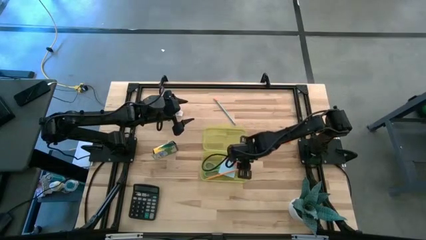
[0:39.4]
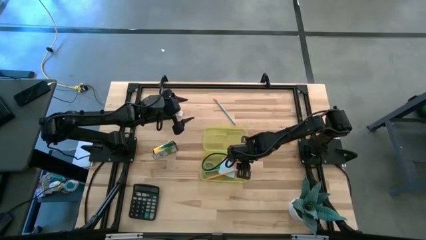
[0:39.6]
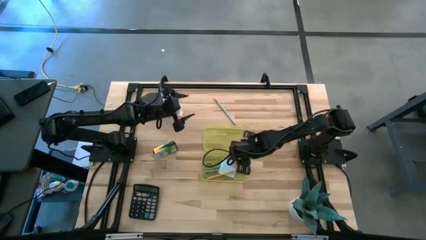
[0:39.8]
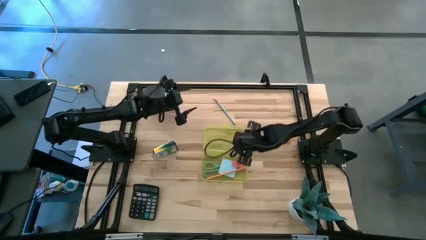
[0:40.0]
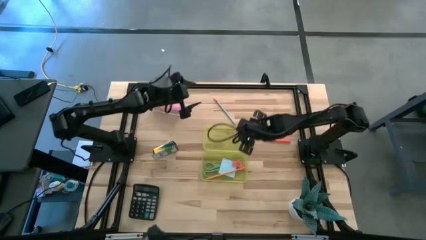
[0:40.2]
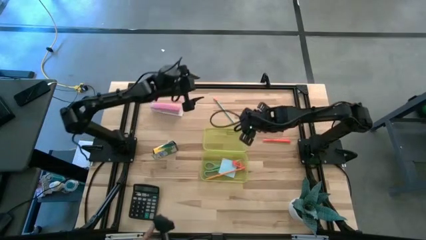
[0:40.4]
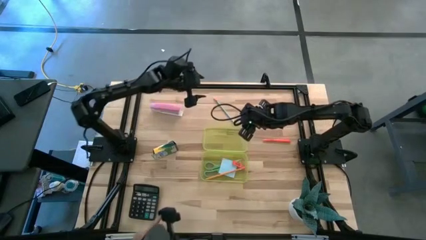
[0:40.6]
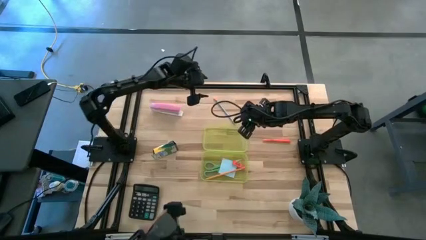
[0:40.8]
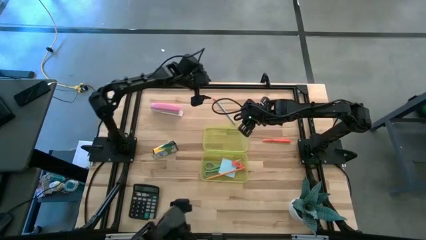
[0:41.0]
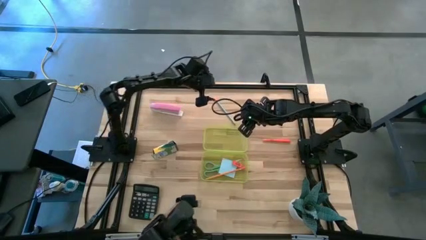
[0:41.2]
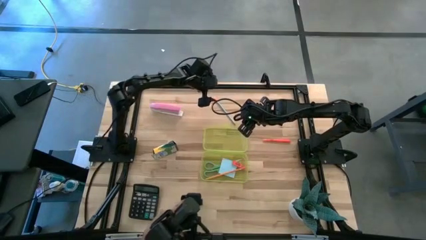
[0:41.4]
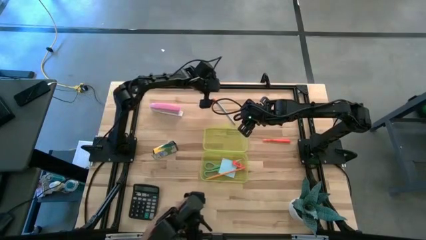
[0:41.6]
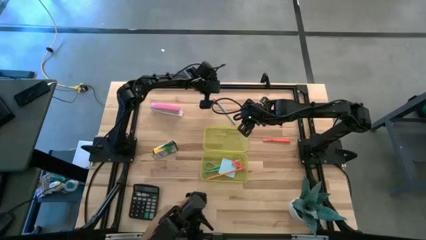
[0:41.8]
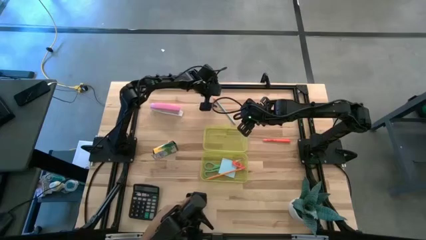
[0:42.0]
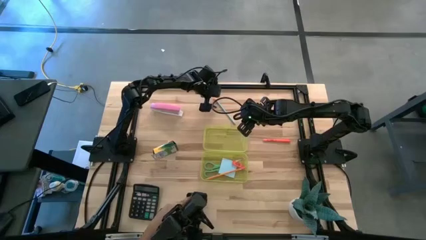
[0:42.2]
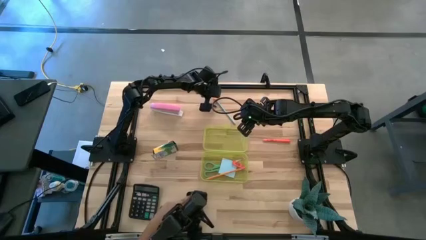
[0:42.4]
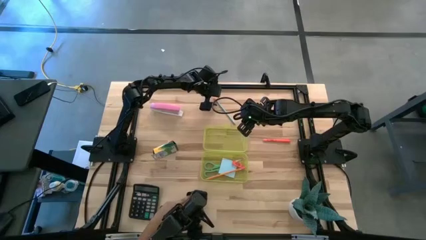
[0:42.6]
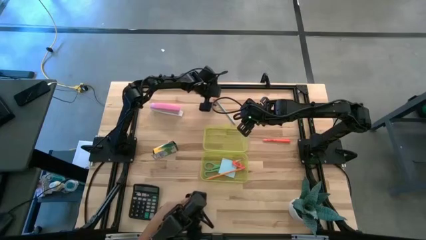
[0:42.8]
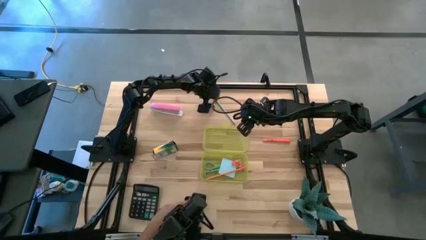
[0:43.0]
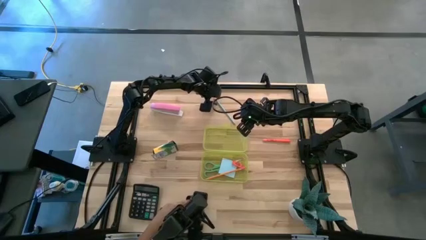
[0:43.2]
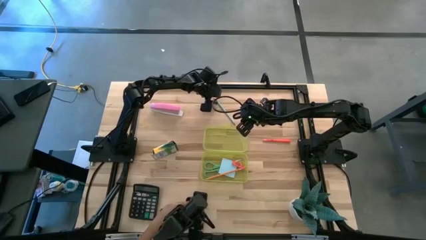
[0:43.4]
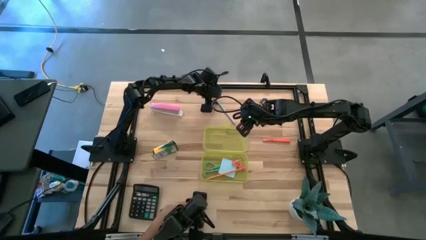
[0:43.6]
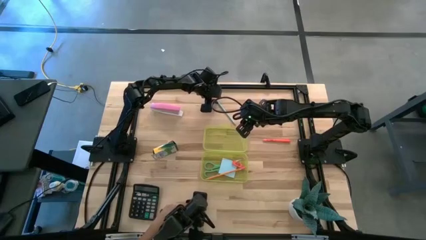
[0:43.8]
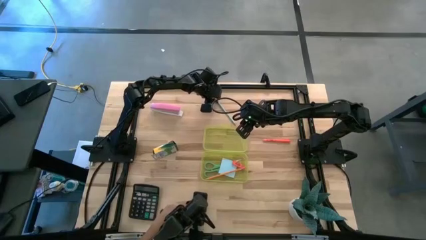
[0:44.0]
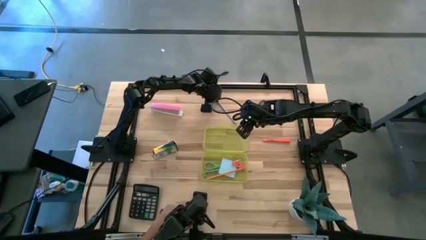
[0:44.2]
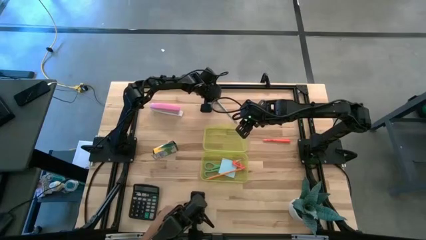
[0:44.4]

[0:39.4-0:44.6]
Task: Pack school essentials
Put the light blue pencil into the supply box

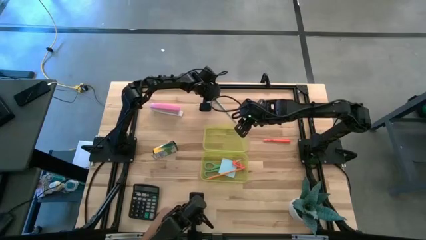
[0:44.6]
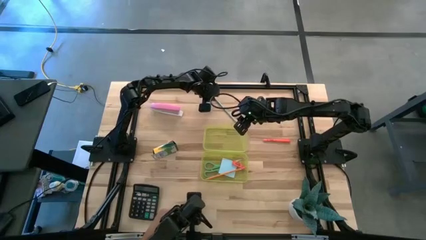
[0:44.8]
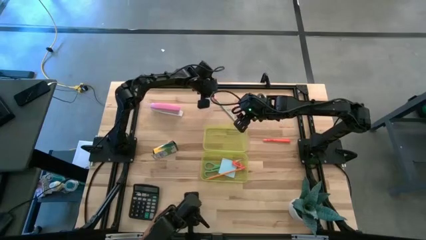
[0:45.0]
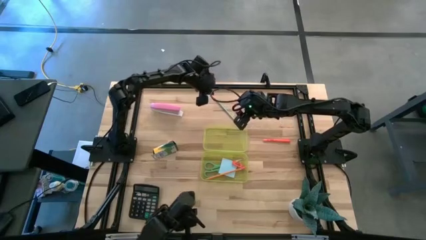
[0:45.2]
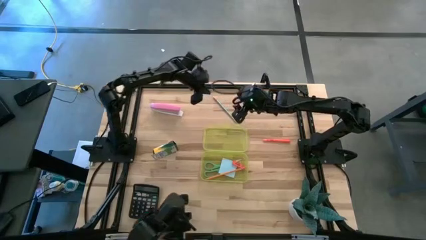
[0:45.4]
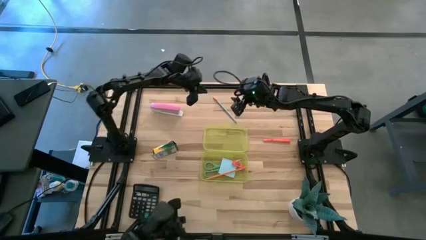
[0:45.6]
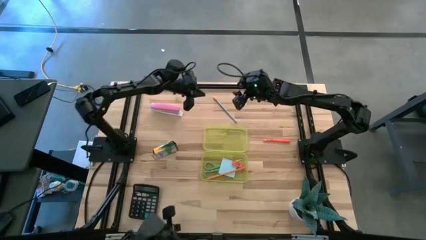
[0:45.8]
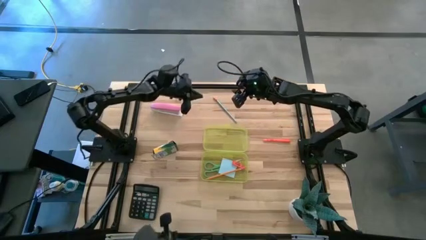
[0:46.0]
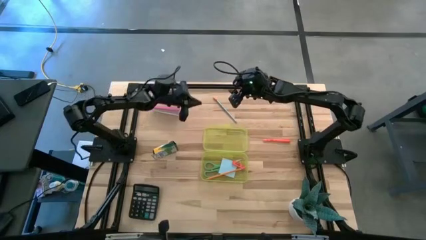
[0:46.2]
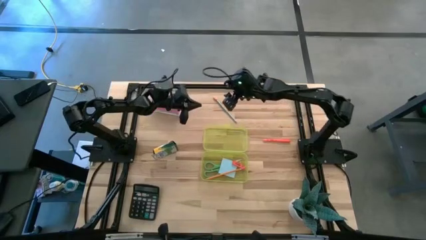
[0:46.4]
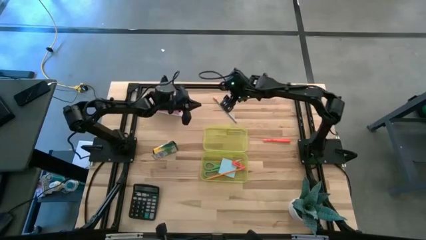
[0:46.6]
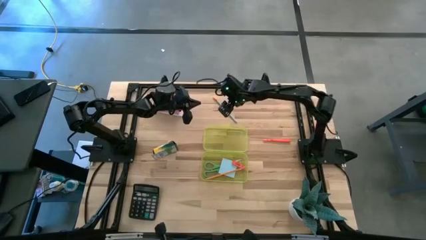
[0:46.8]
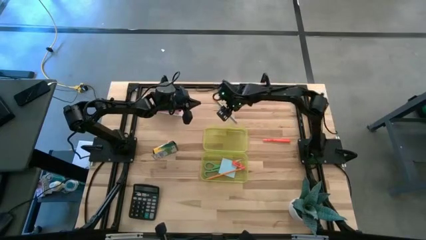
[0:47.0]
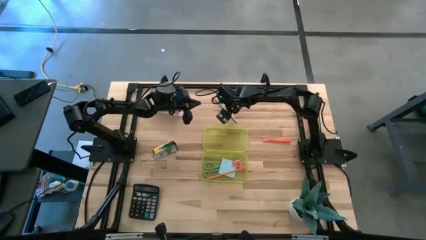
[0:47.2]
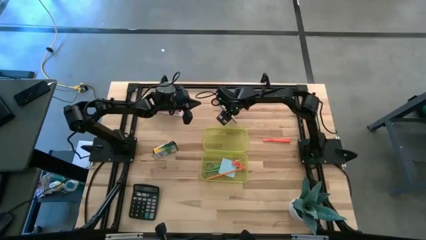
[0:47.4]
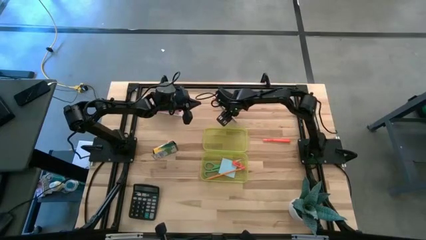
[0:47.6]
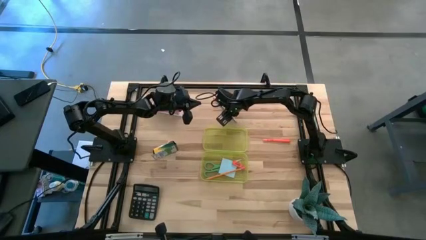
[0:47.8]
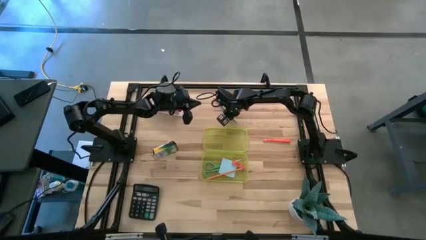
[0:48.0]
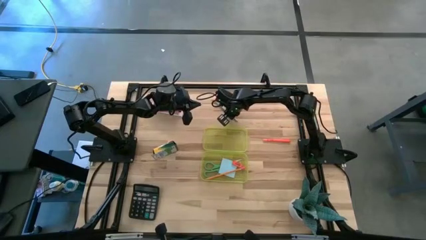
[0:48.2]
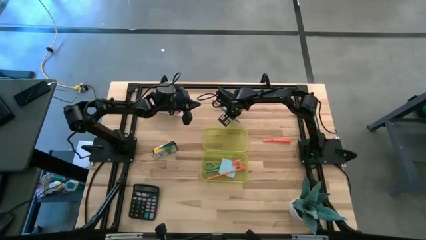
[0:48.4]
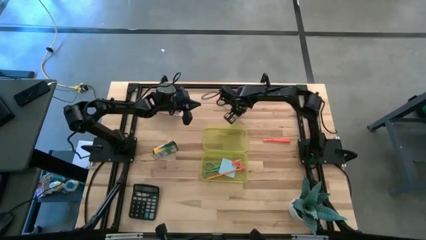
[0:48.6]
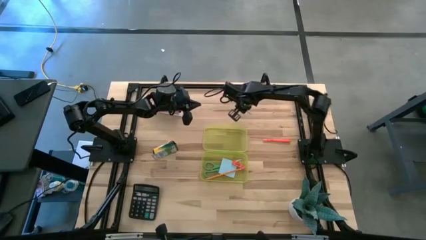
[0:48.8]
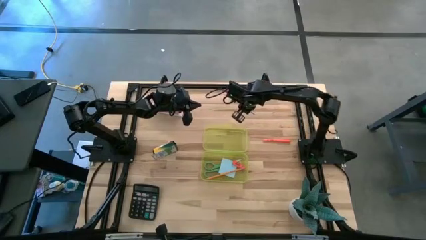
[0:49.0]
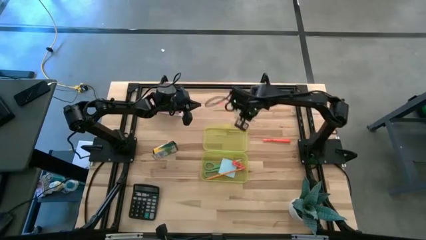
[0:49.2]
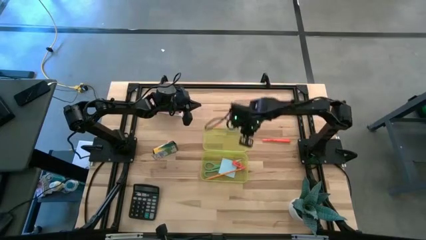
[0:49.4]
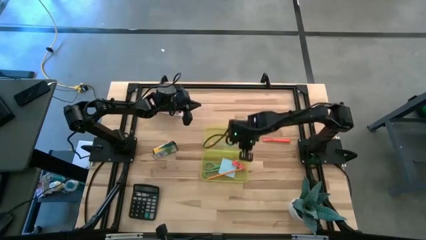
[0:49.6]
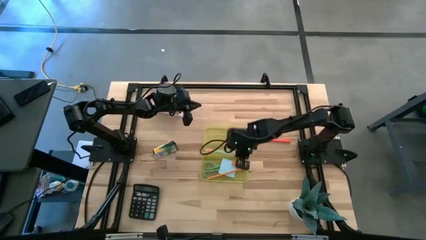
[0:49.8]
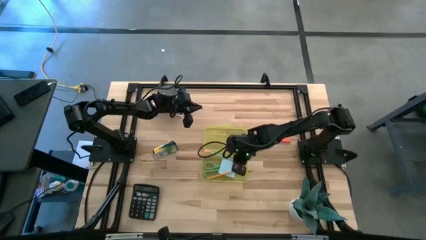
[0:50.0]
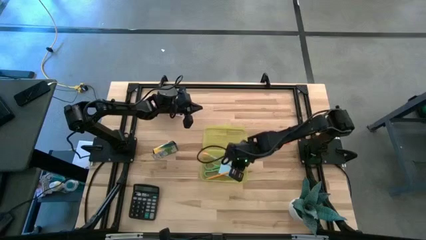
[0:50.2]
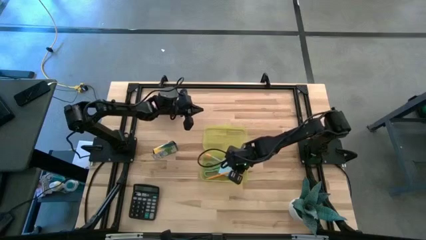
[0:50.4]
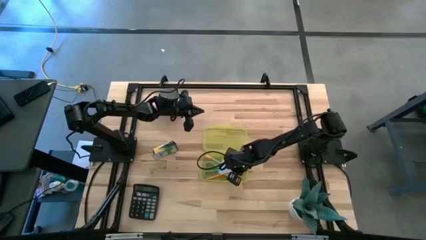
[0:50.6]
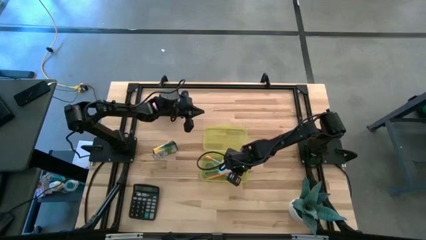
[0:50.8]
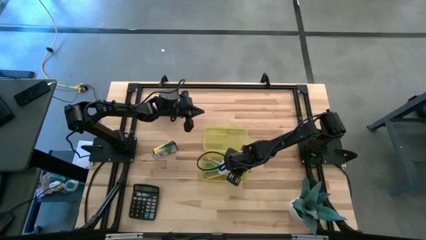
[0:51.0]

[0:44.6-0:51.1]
Put the light blue pencil into the supply box

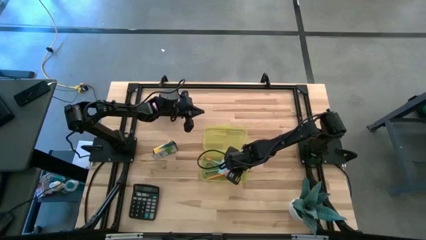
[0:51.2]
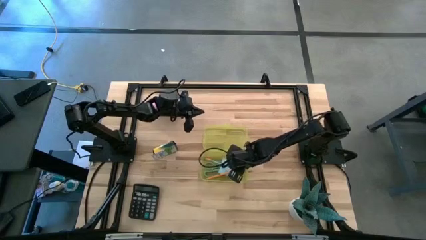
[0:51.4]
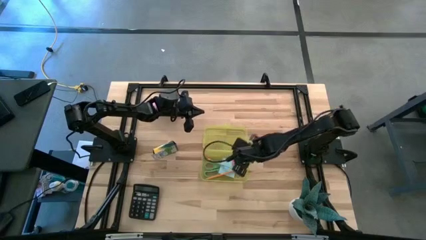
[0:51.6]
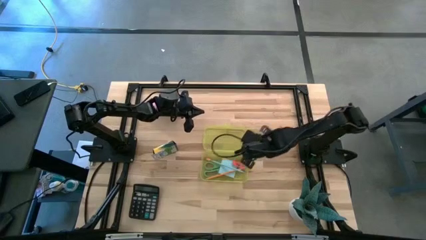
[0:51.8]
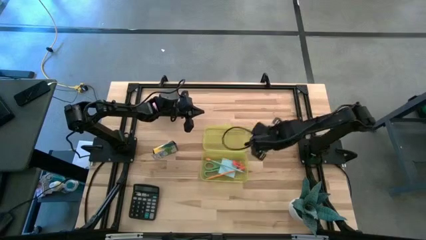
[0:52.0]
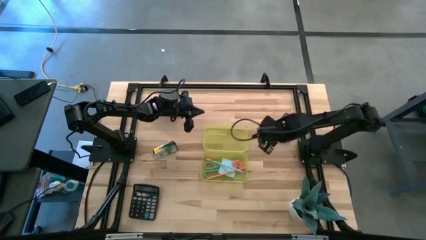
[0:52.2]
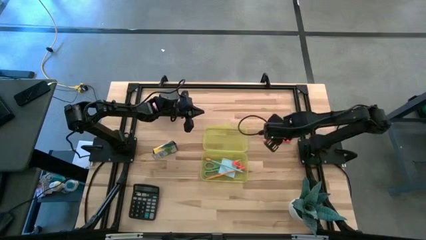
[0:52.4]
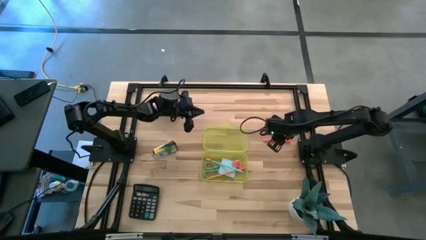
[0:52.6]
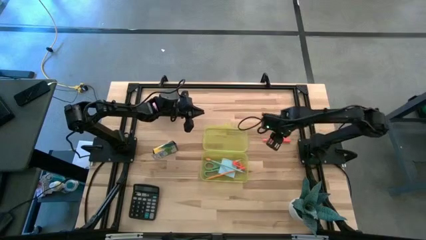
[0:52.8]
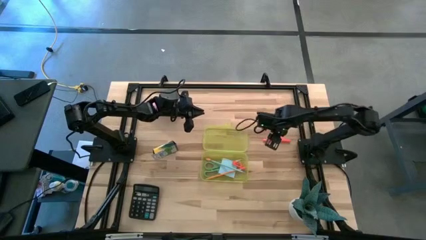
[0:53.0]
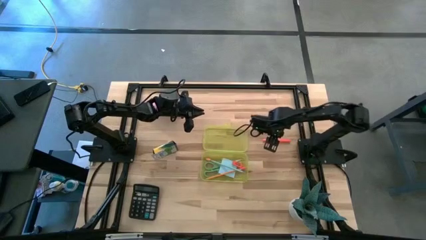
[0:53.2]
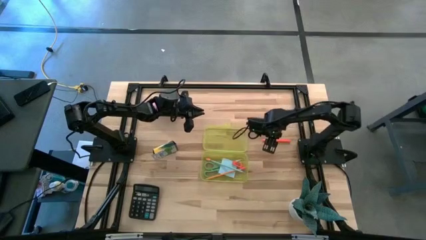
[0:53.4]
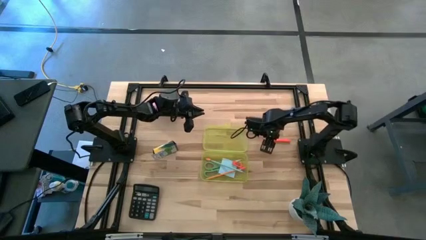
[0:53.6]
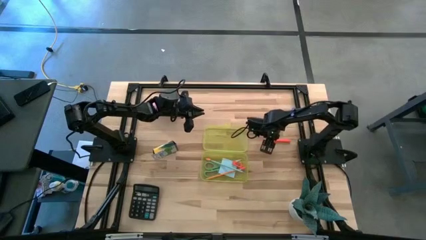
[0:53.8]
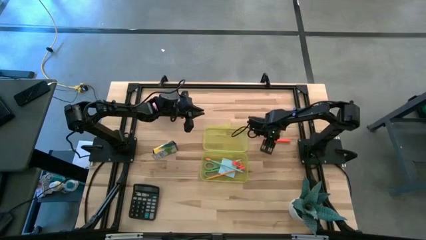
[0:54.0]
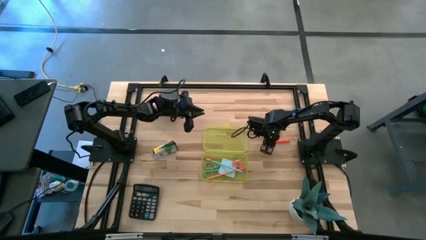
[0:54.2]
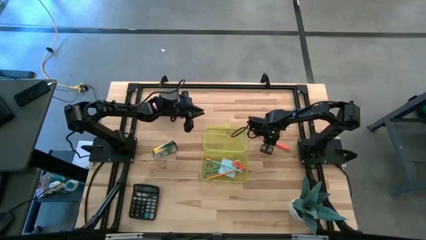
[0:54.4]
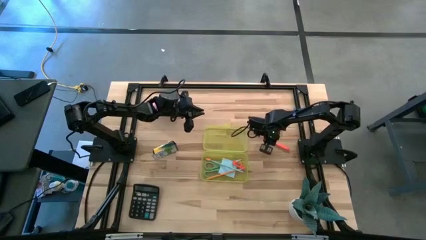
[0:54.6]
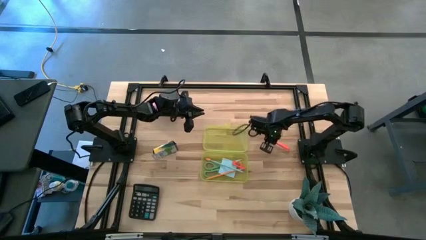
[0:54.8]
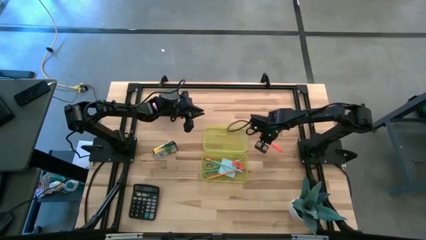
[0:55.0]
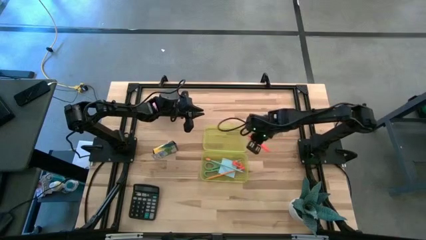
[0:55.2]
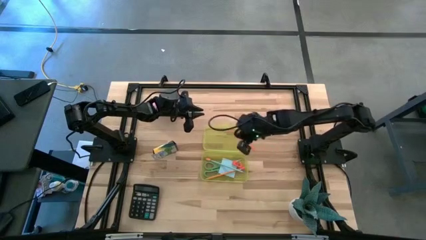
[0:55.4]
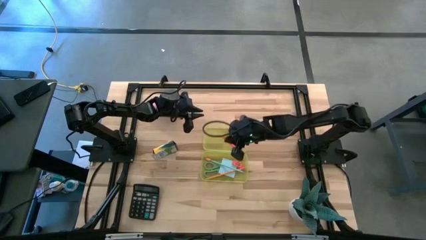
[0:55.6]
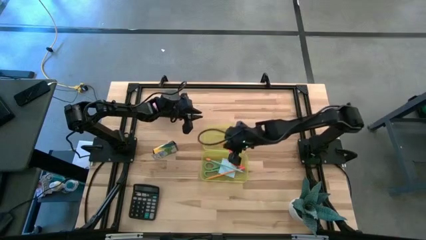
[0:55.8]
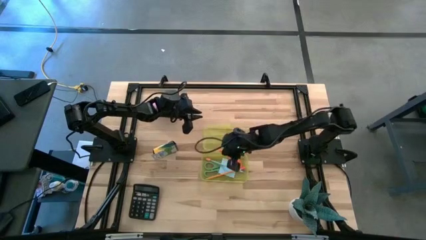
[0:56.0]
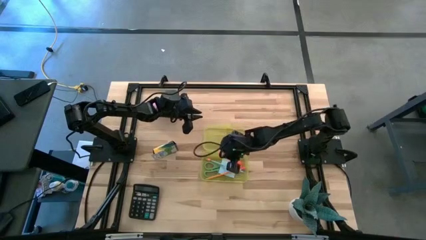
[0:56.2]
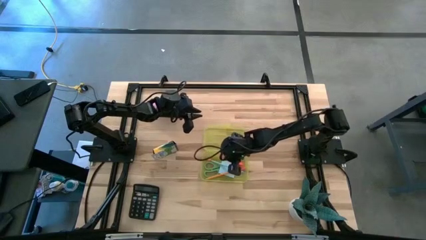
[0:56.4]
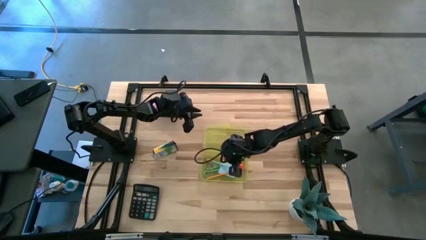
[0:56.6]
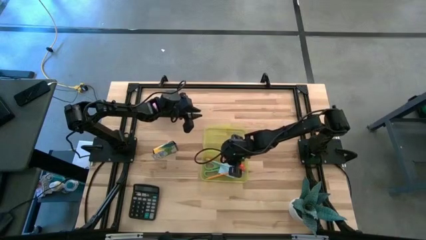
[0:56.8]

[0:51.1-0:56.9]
Put the orange pen into the supply box
